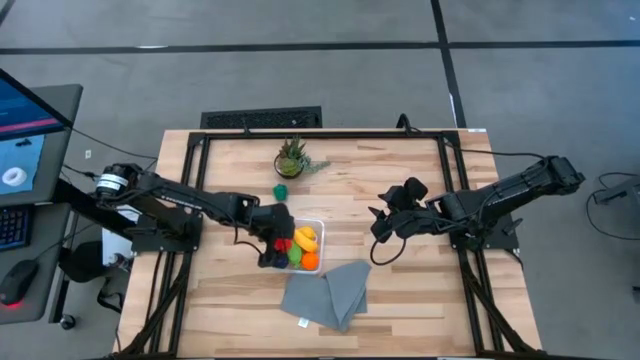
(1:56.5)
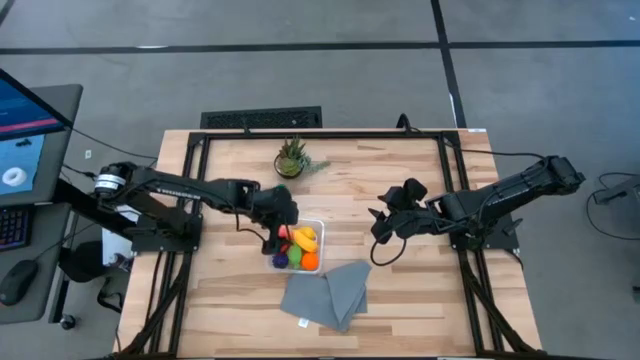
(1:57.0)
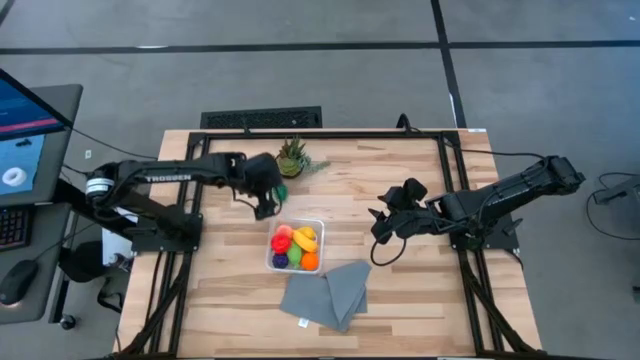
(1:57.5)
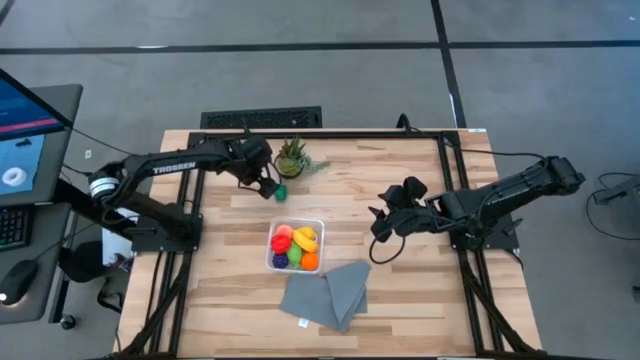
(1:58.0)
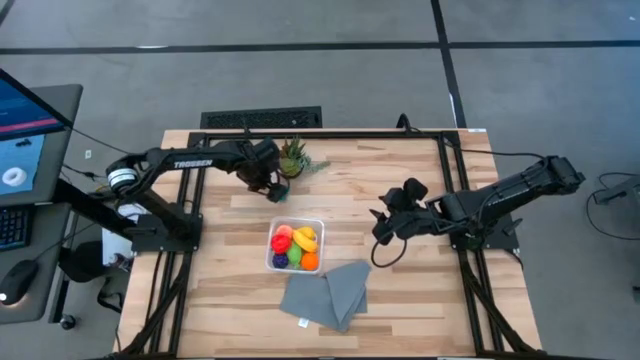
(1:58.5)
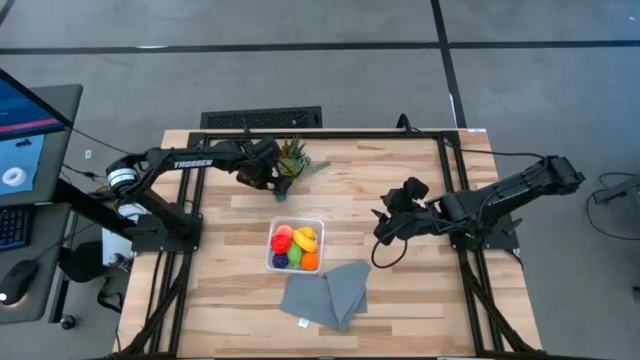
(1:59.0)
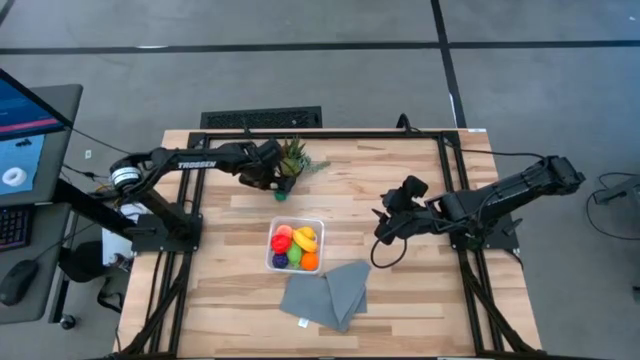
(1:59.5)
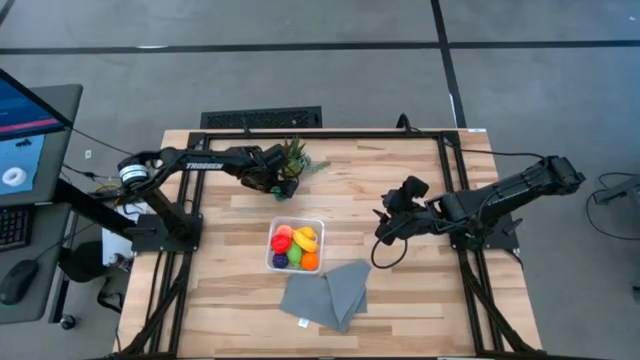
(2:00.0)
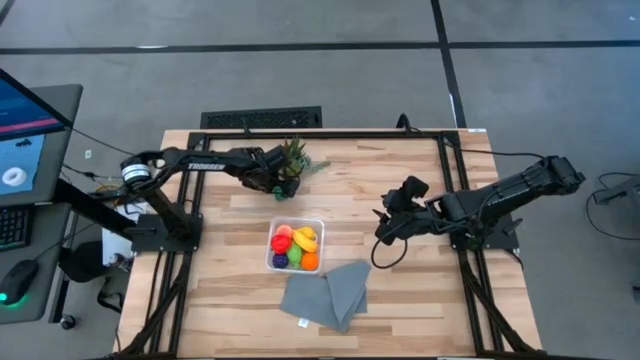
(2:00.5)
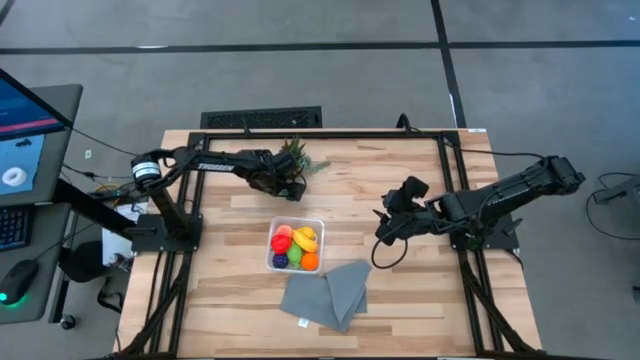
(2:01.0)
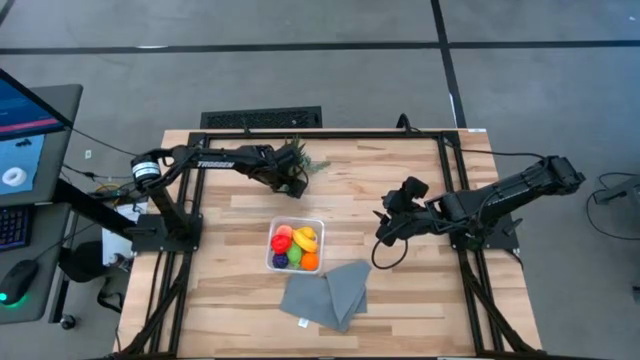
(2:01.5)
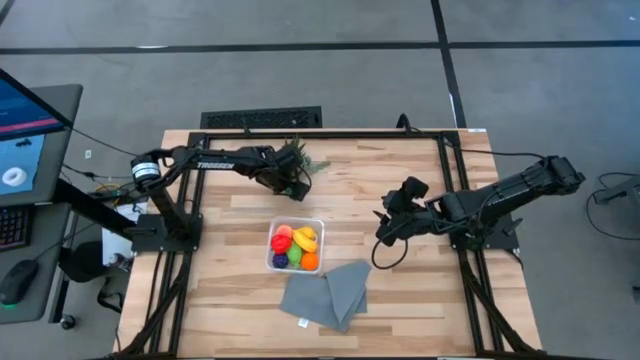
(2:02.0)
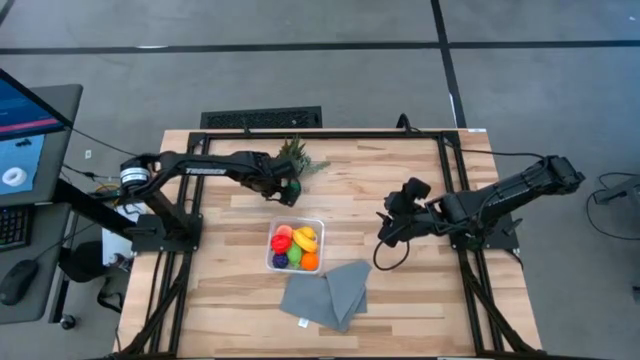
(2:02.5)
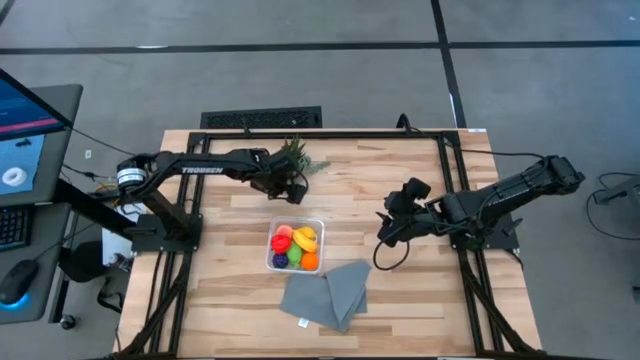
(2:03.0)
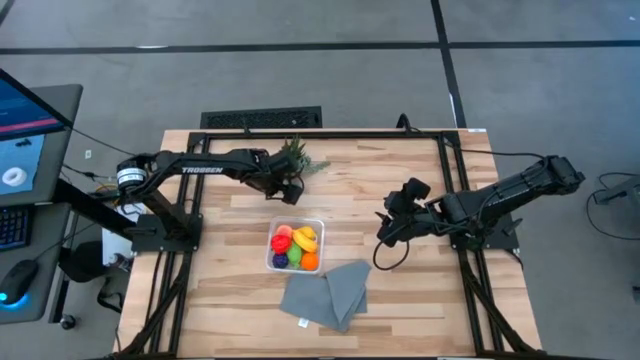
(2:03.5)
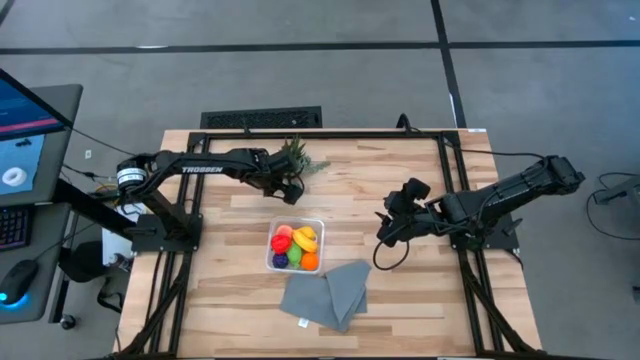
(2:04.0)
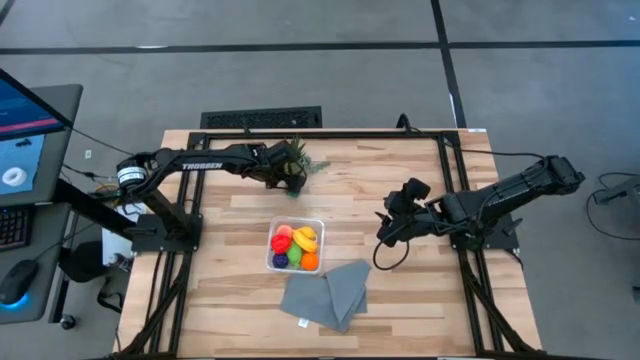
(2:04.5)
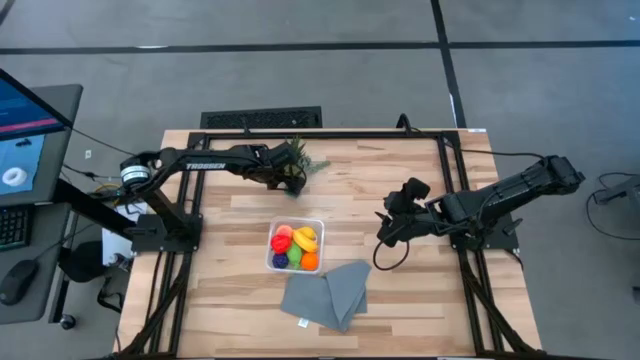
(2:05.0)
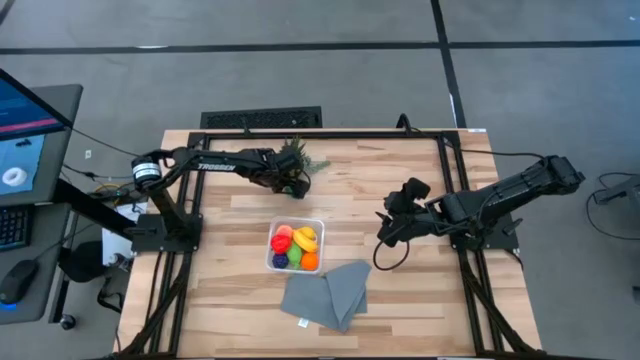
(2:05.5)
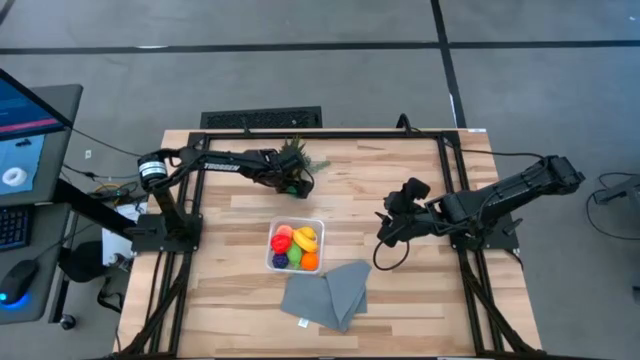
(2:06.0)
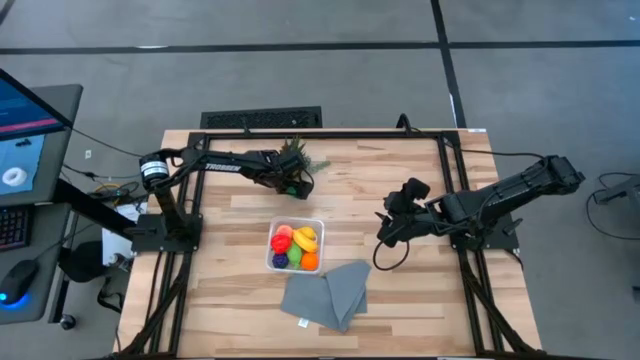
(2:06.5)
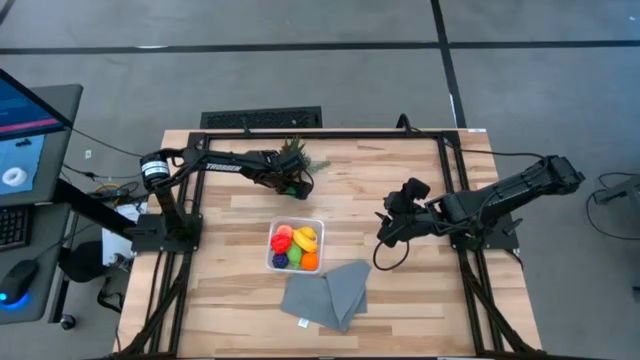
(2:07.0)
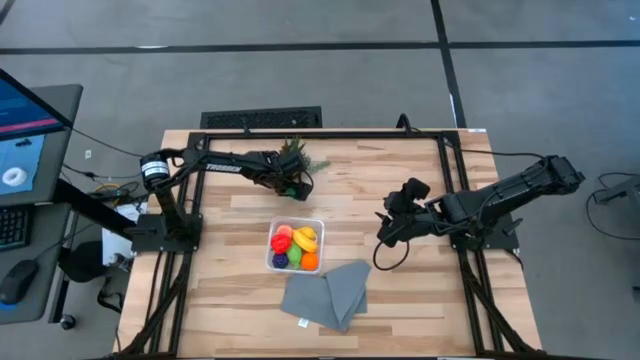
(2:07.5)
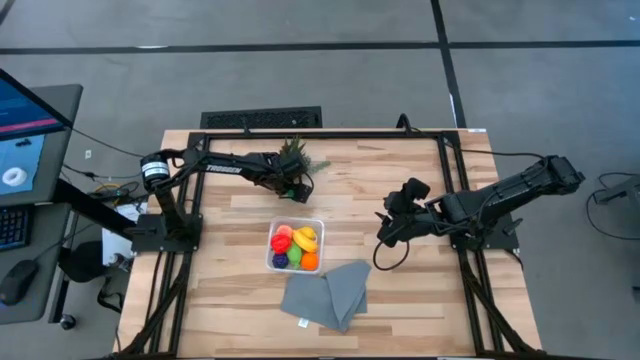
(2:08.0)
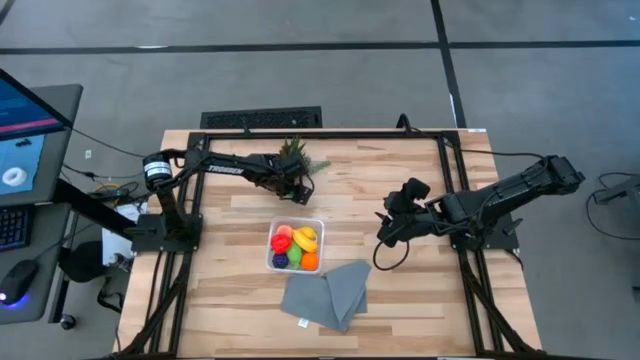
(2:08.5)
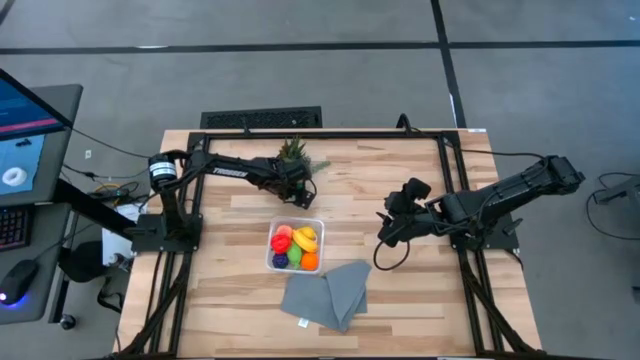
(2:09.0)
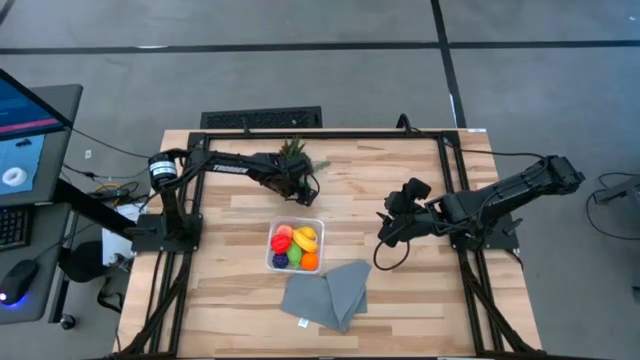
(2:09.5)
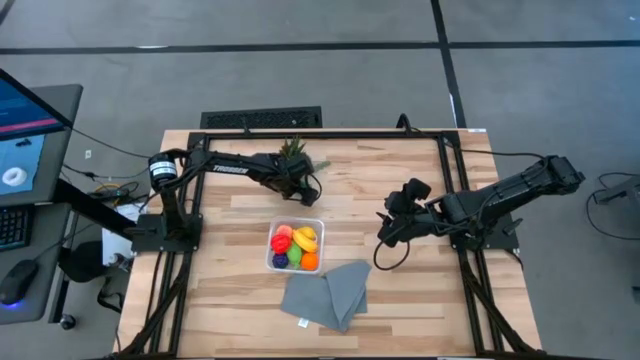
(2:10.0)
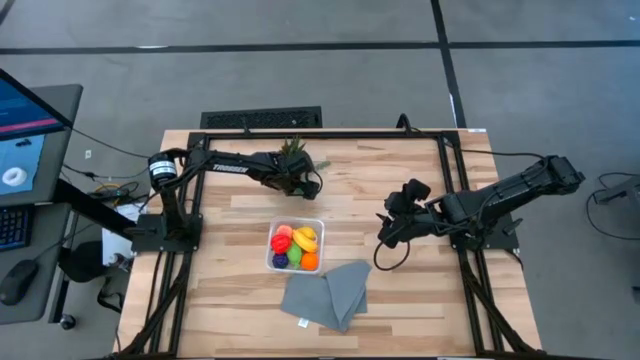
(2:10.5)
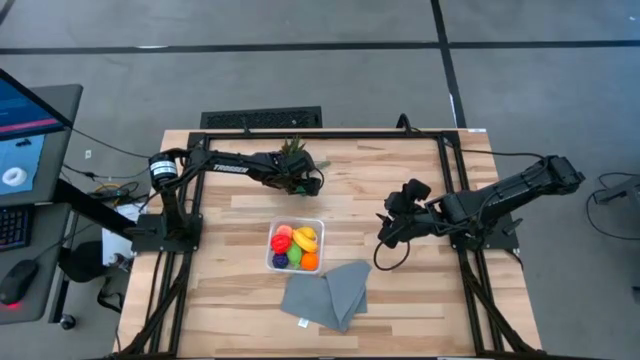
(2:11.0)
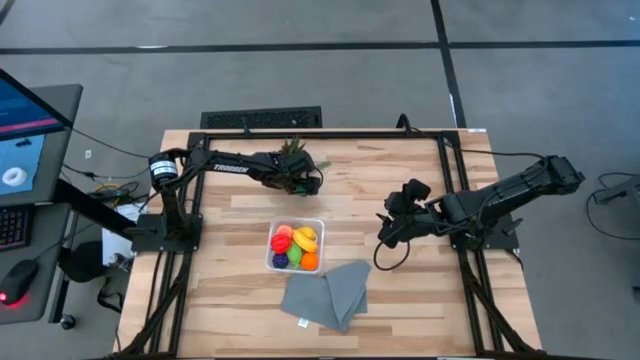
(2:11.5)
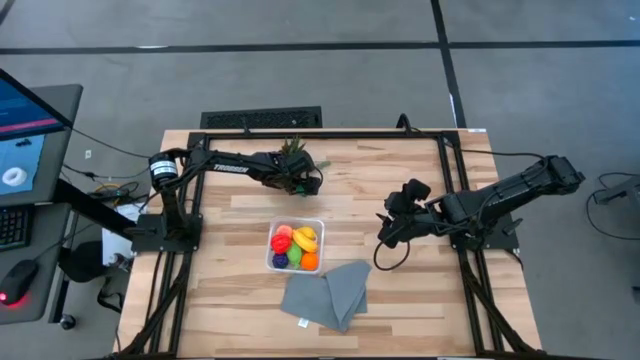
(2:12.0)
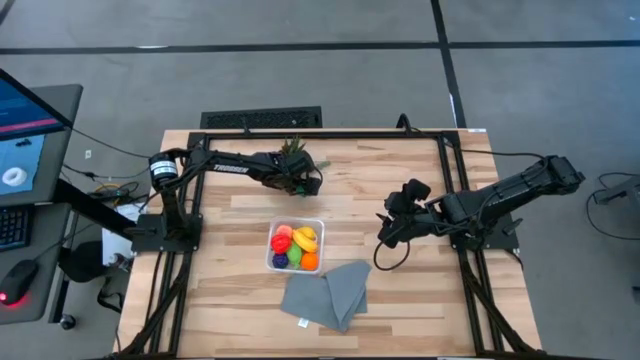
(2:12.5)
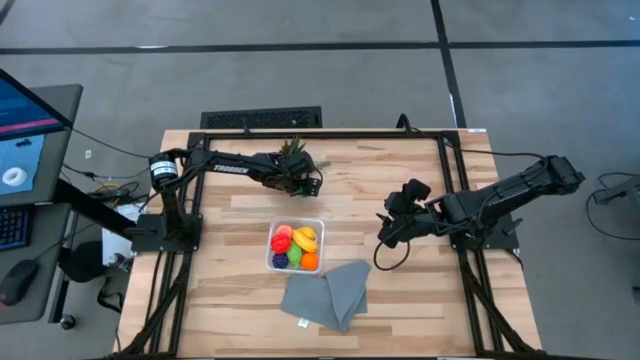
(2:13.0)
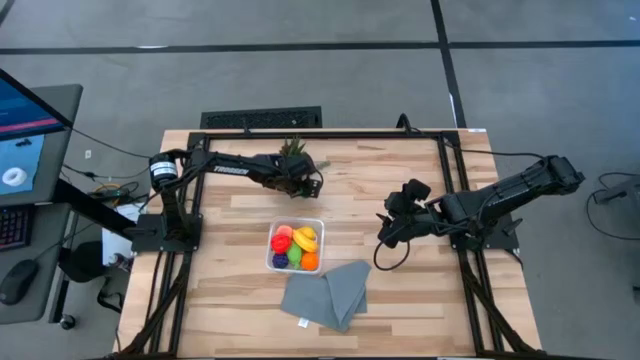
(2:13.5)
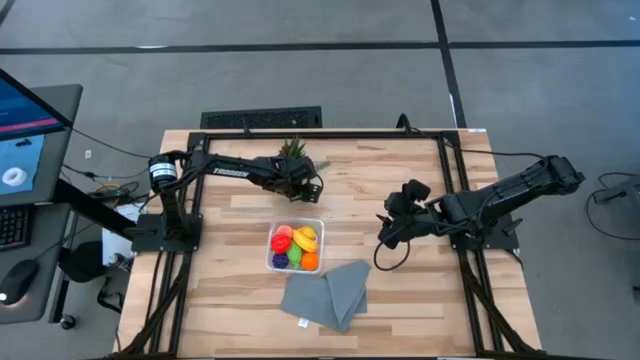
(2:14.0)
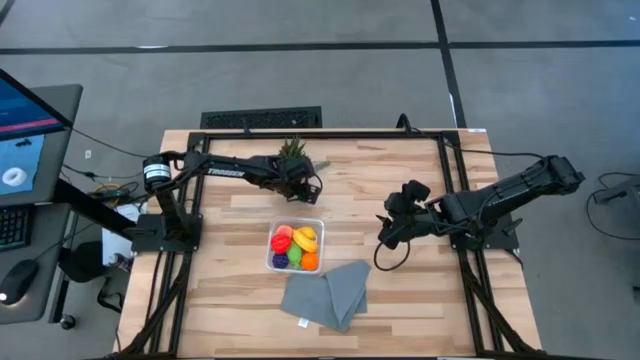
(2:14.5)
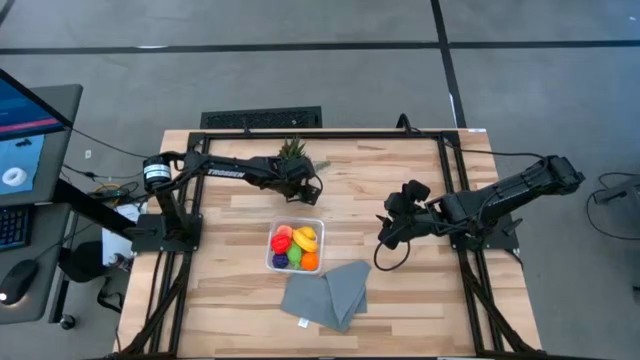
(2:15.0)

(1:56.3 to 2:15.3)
Task: Pick and placing Produce into tupperware
Put the green bell pepper into the transparent container
